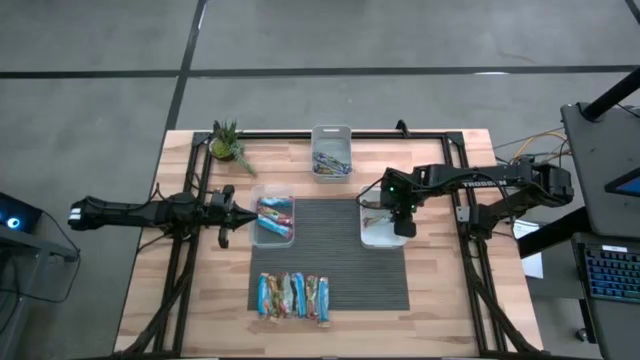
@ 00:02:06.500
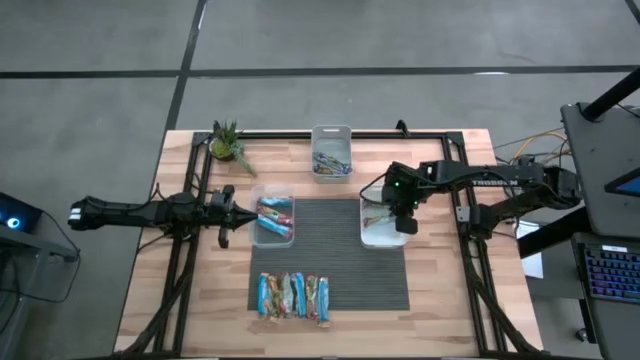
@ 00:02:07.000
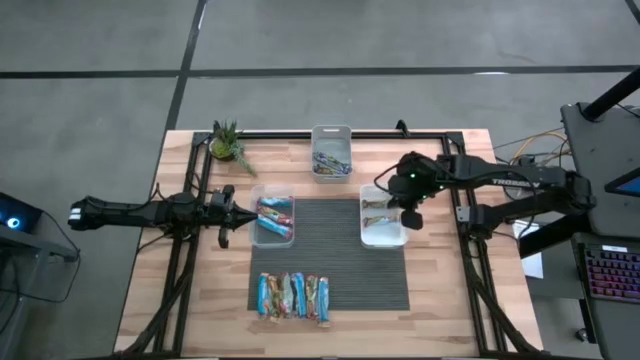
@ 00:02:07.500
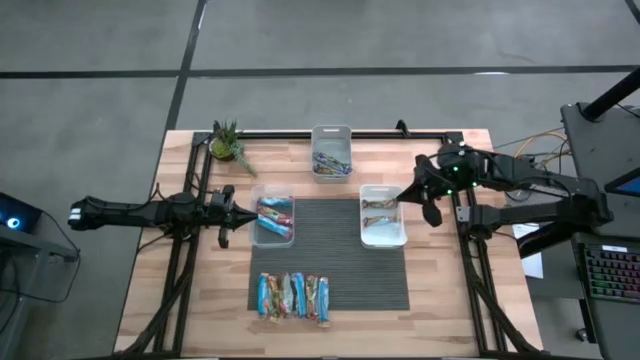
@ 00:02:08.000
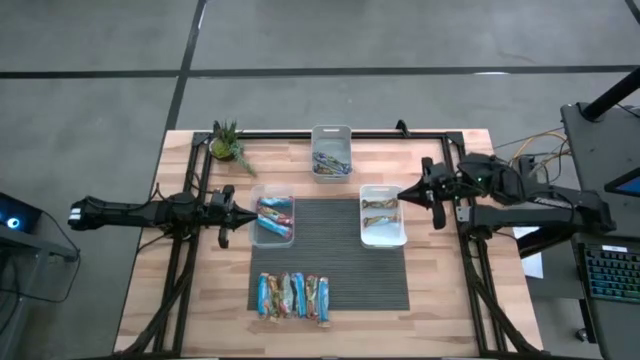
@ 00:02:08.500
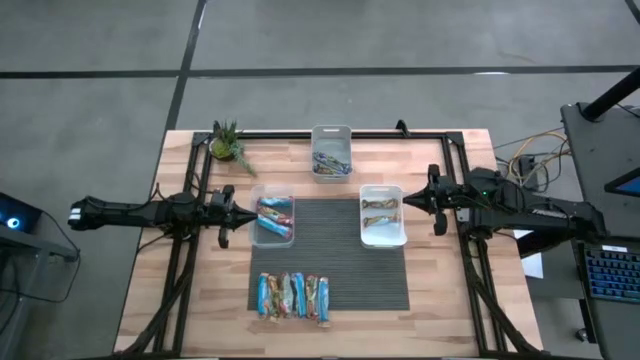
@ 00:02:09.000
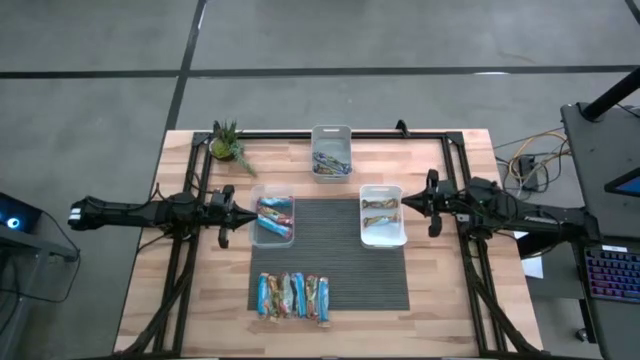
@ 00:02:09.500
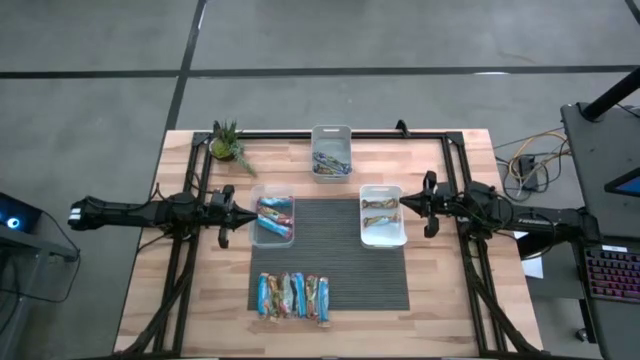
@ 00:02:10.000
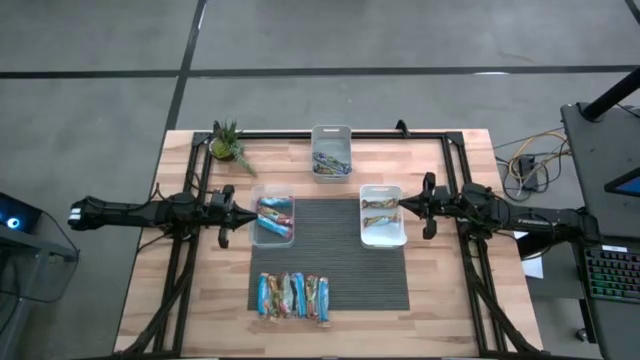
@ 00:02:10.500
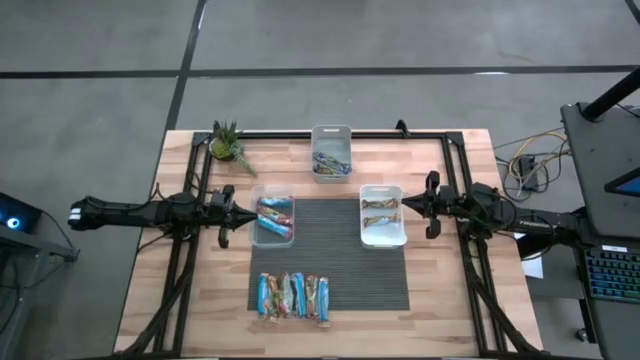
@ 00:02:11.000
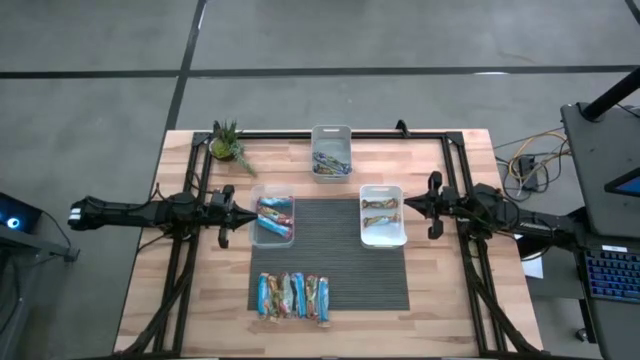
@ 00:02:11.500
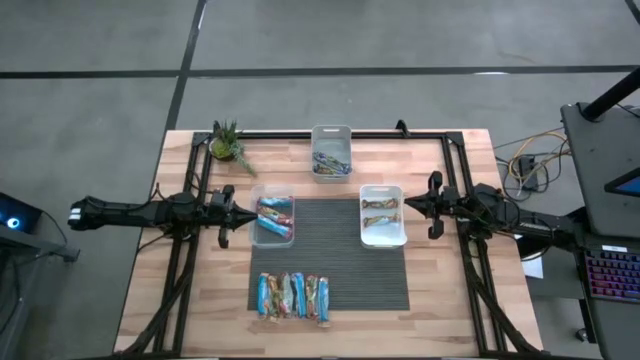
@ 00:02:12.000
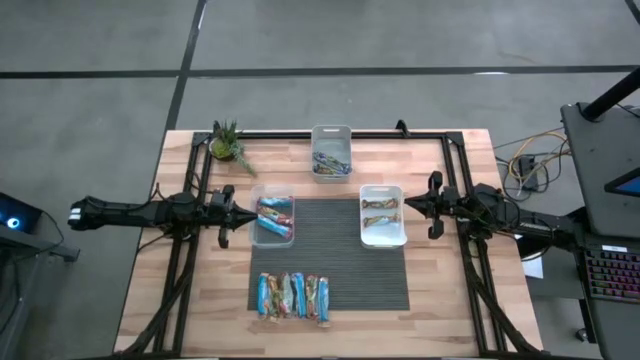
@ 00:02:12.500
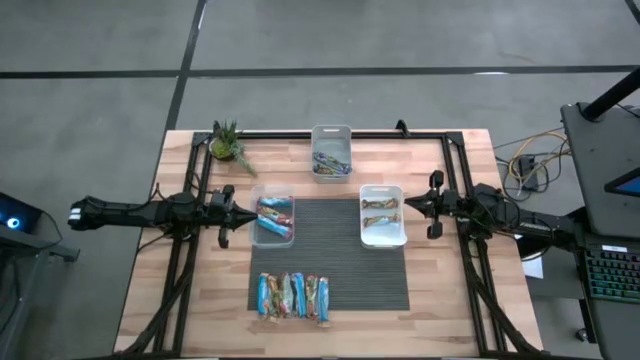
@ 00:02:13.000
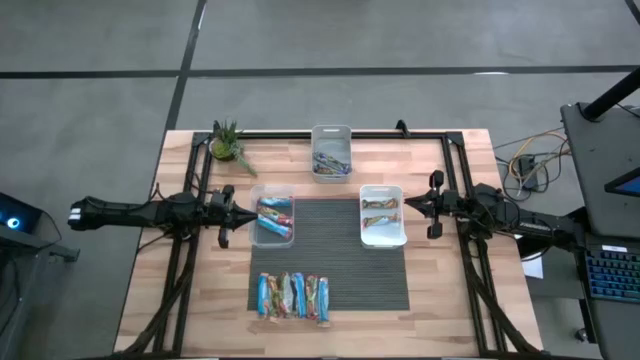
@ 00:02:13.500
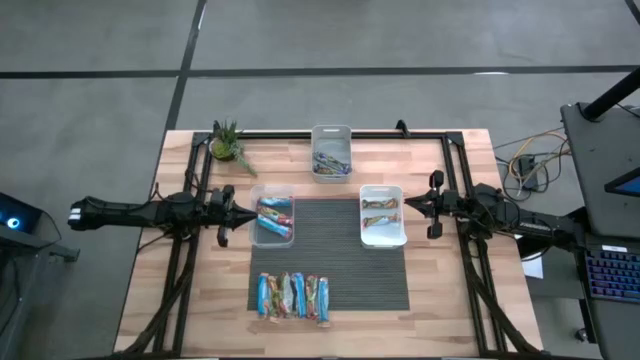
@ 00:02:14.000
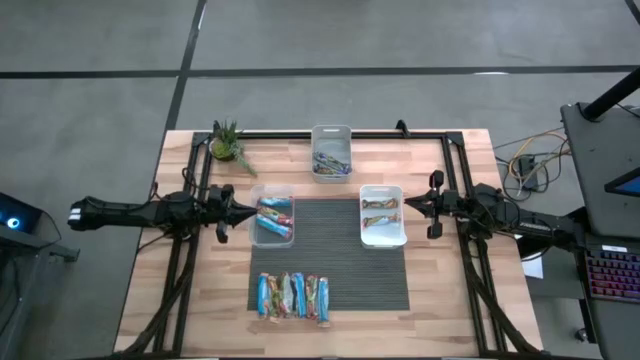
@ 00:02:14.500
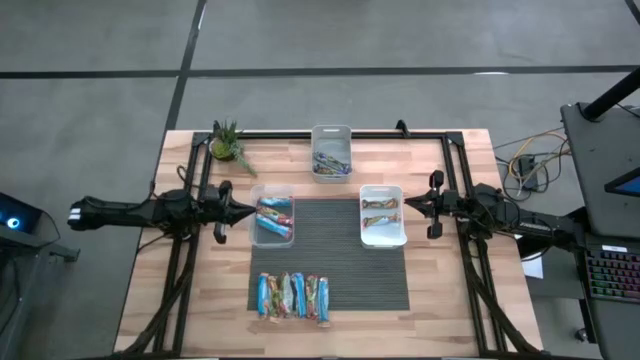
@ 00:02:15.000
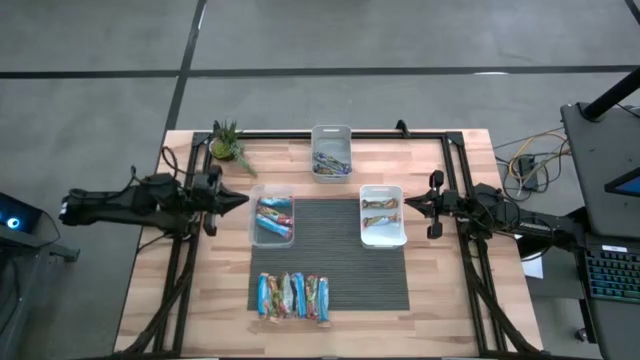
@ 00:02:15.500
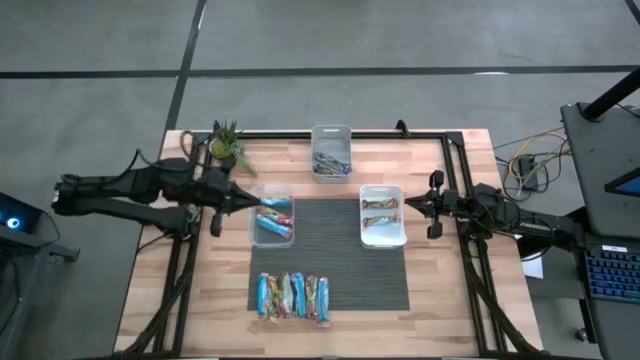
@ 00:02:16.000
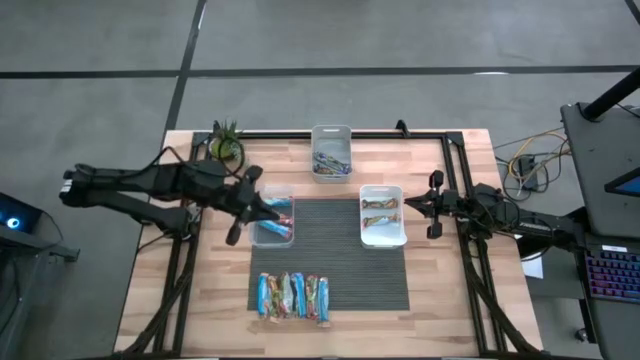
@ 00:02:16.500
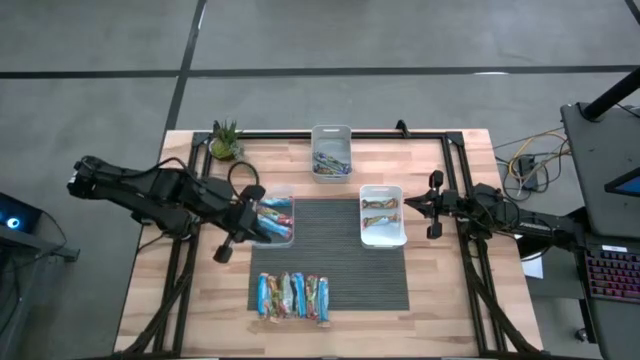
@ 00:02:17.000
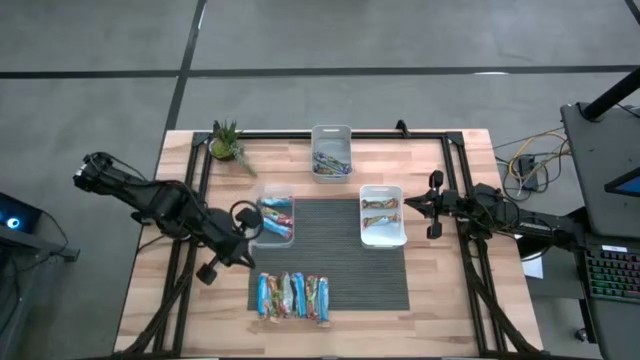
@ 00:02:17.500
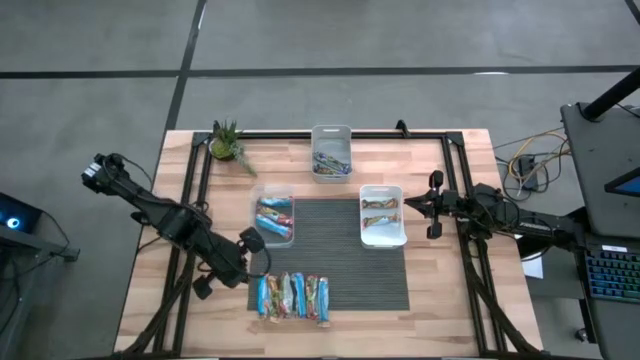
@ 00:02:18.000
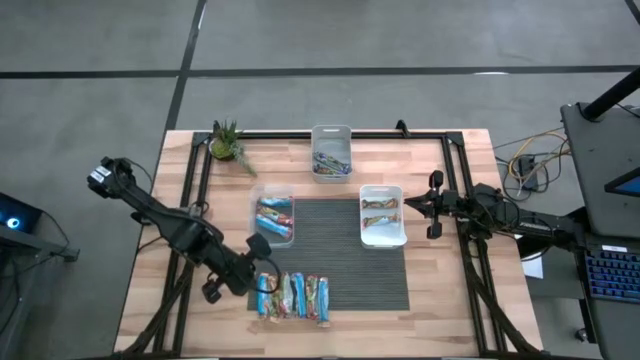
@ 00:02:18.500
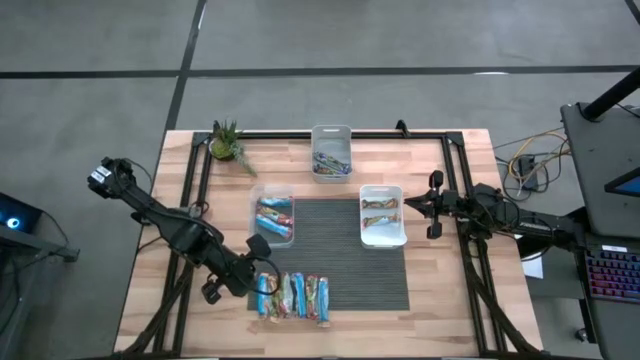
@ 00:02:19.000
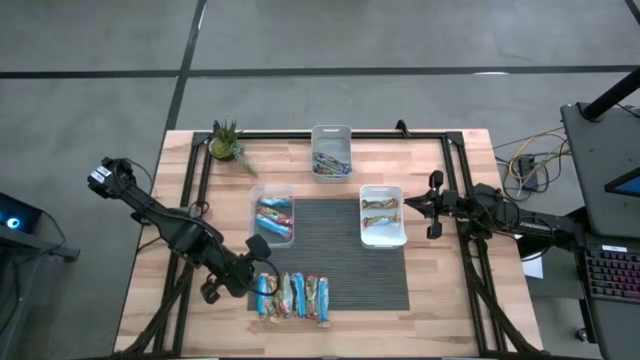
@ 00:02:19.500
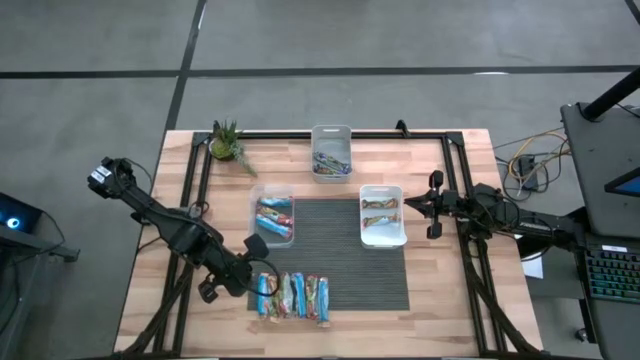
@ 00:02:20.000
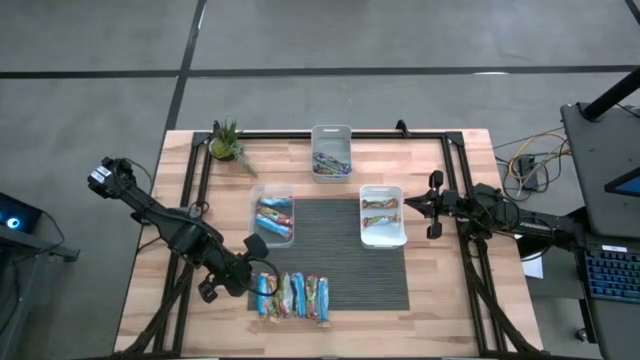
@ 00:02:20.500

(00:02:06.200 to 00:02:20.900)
Task: Pick and place Granola Bars by type
Put the yellow granola bar into the white bin

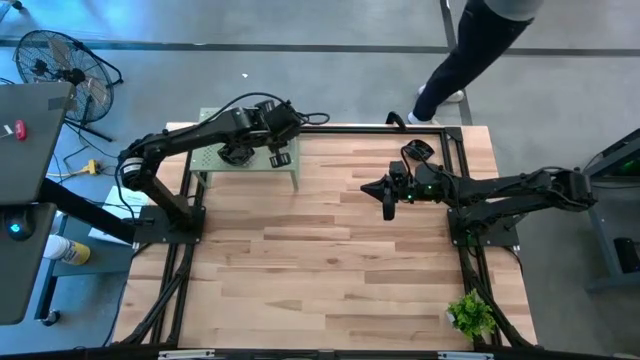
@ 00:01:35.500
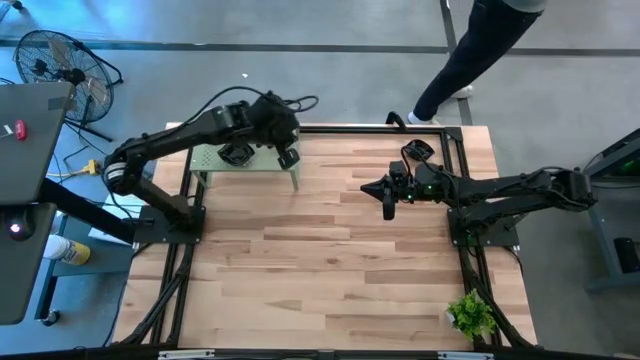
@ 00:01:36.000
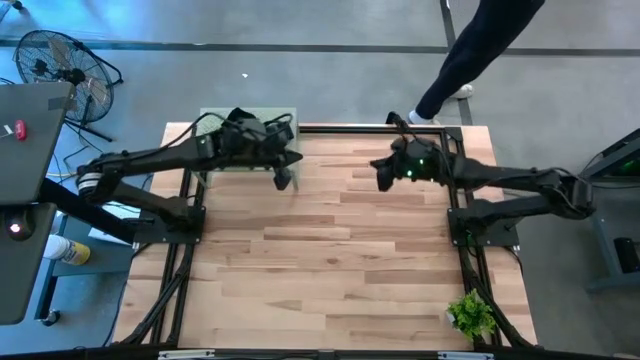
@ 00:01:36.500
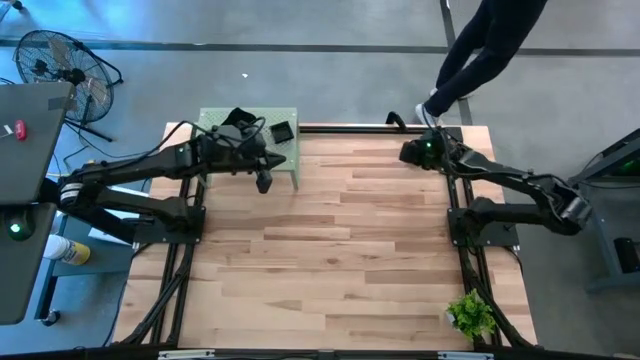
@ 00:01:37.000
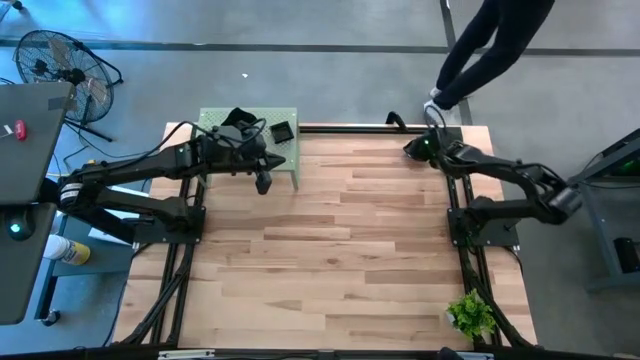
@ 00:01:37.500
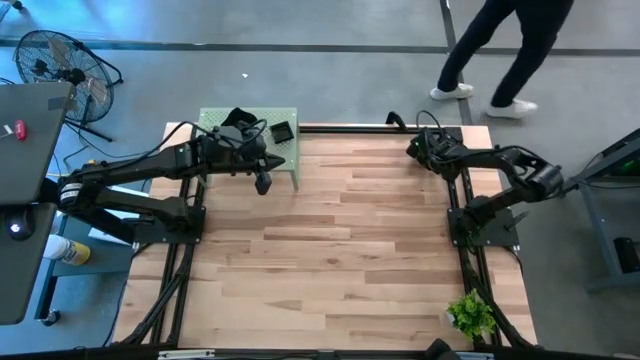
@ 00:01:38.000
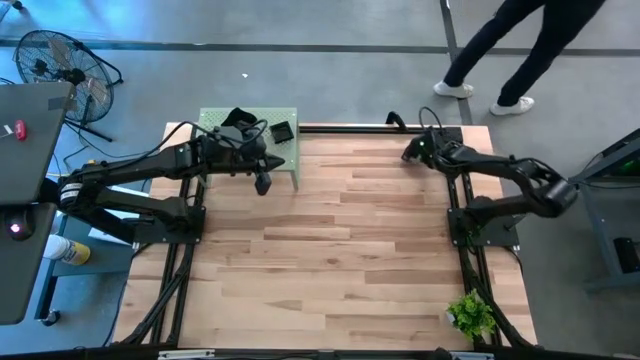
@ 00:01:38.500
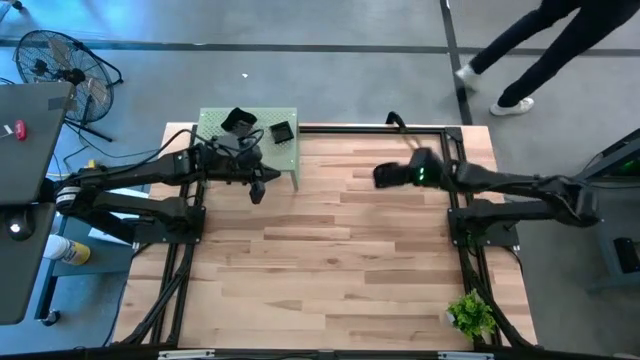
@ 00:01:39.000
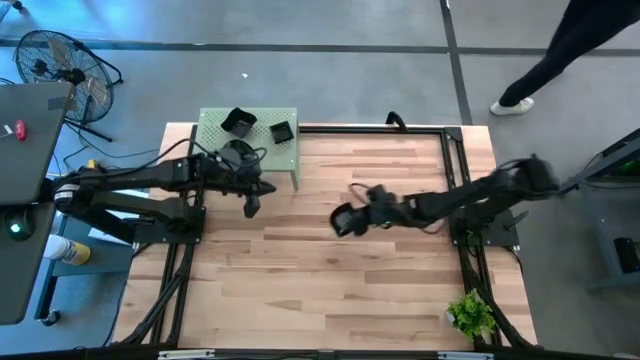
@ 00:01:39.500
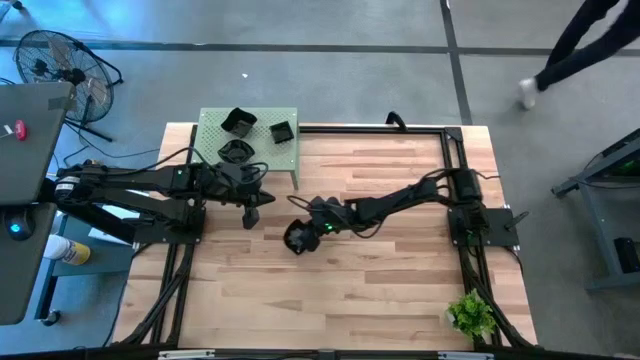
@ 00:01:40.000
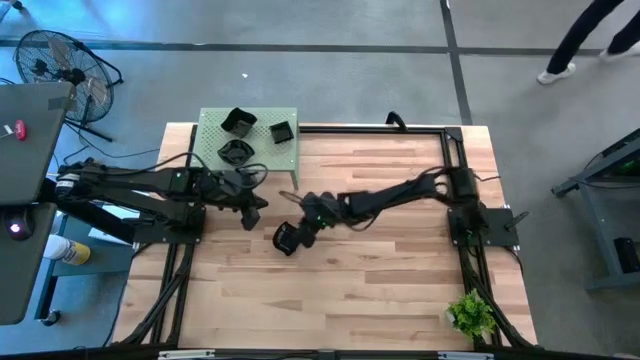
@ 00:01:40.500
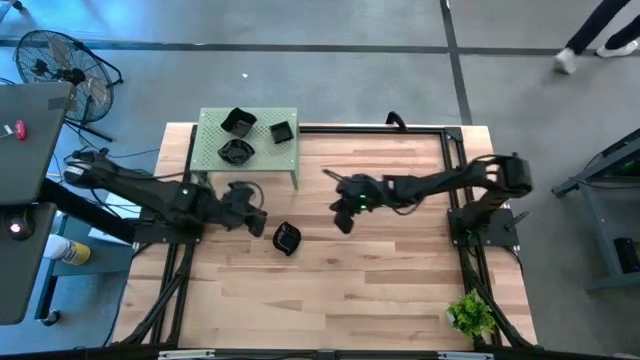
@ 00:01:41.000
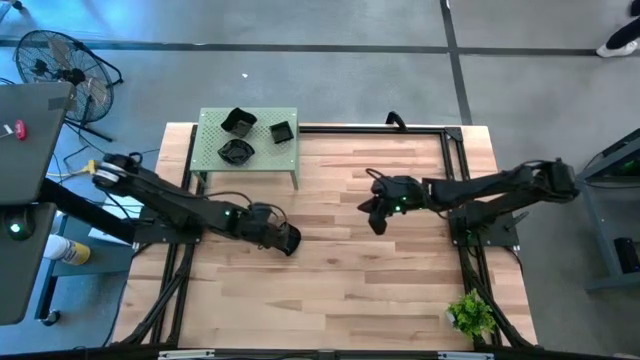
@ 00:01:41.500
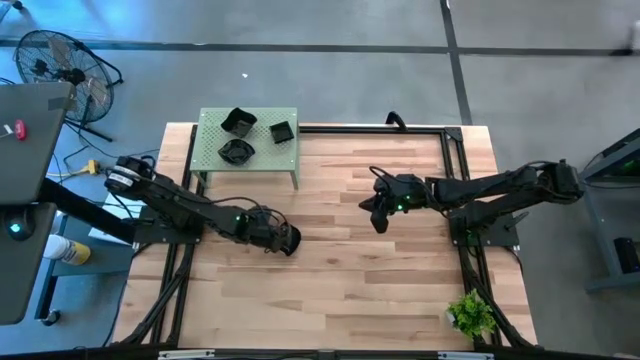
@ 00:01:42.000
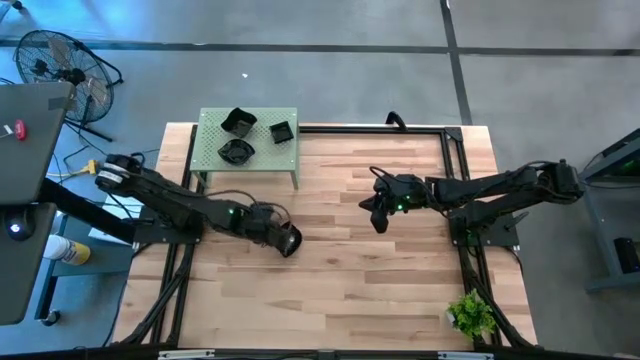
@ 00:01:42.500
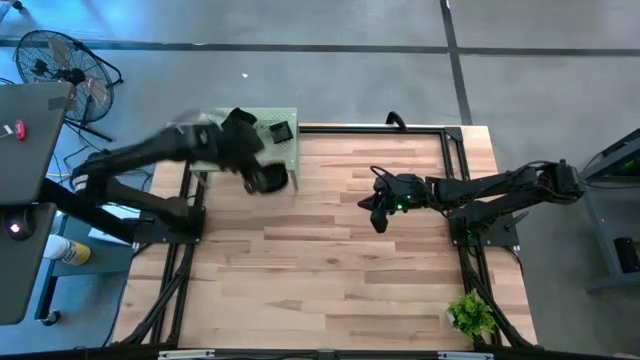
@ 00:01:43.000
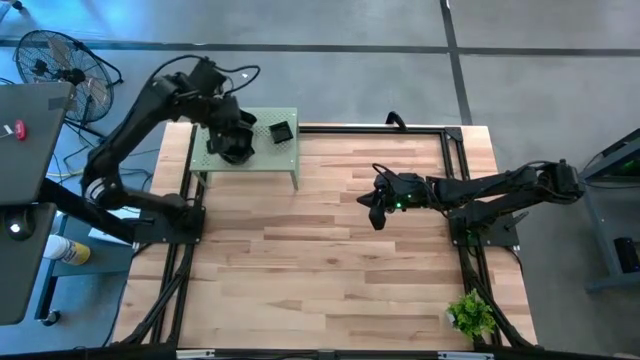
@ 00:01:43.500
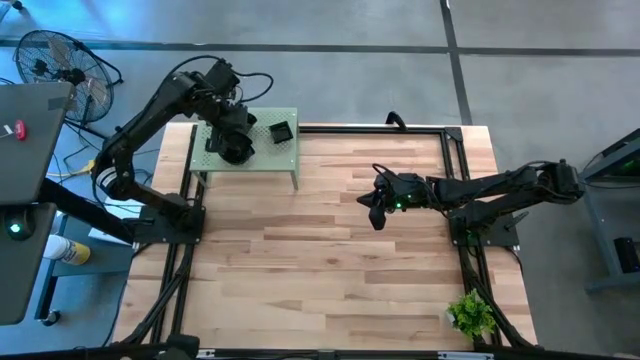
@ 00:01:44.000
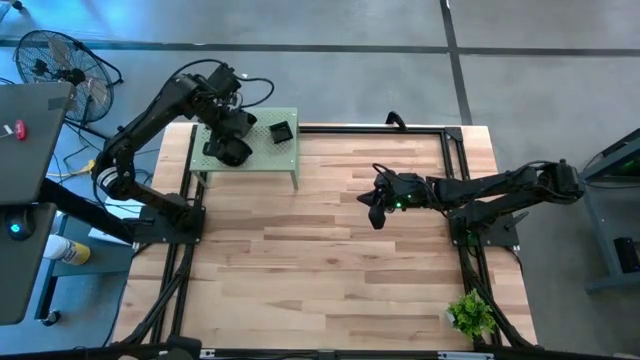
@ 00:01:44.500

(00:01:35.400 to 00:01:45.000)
Task: Pick & Place Mini shaped plates
Stack the black leaf-shaped plate on top of the stacked black leaf-shaped plate on the shelf
